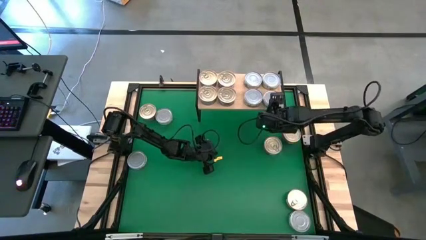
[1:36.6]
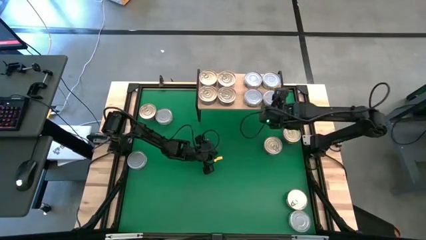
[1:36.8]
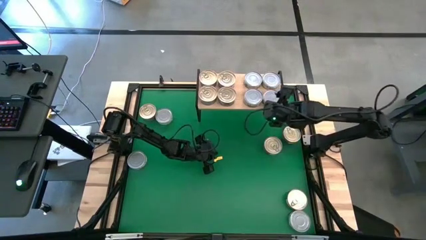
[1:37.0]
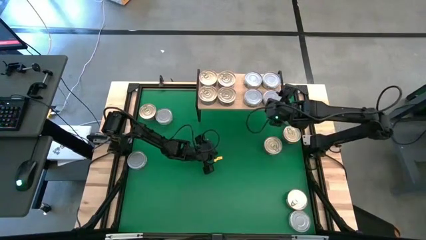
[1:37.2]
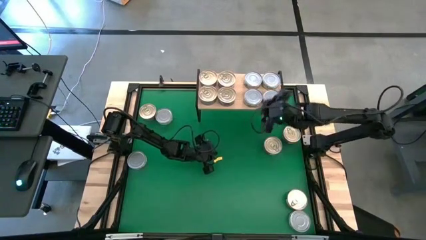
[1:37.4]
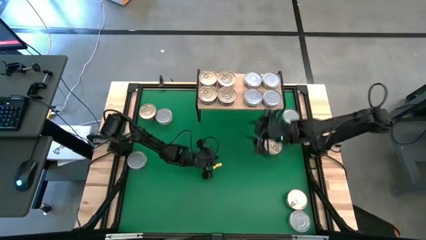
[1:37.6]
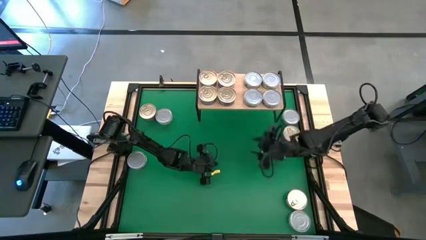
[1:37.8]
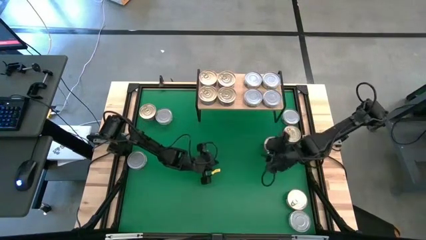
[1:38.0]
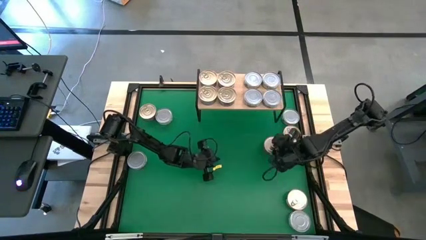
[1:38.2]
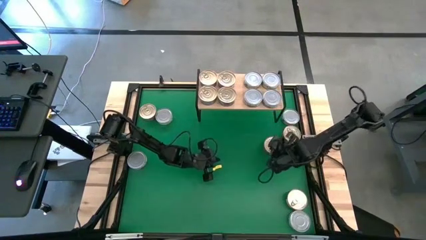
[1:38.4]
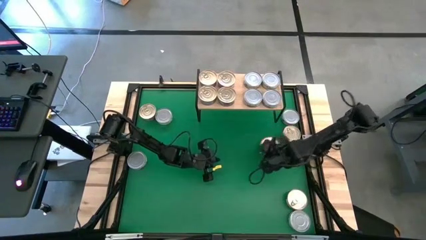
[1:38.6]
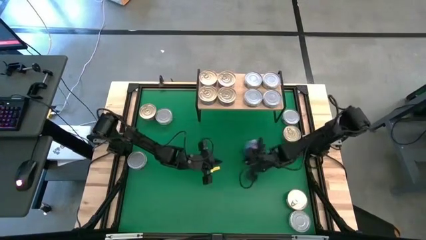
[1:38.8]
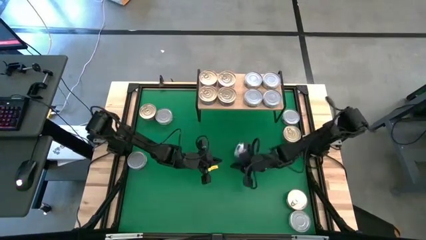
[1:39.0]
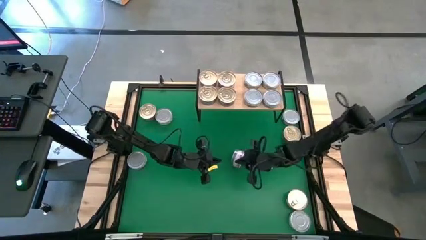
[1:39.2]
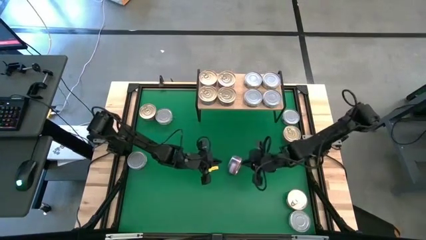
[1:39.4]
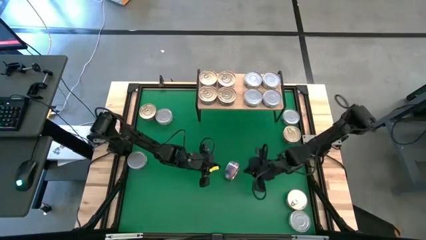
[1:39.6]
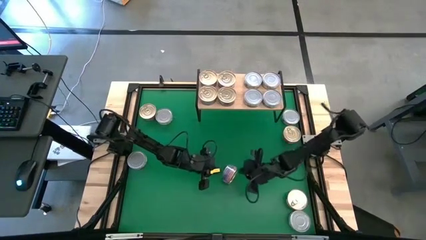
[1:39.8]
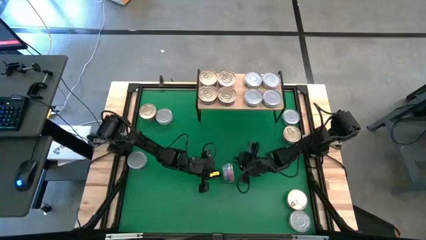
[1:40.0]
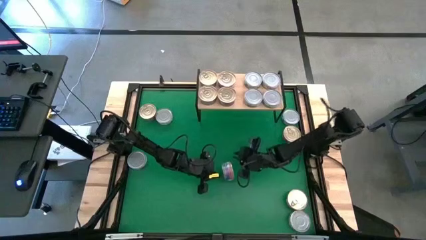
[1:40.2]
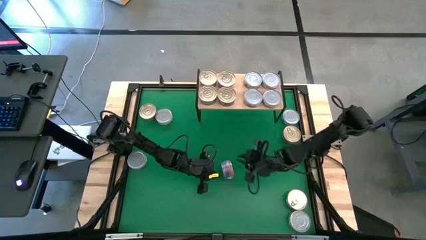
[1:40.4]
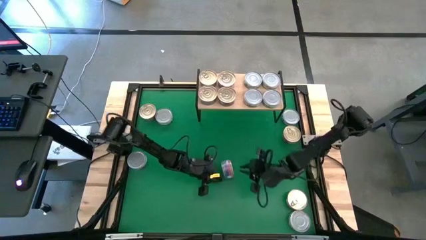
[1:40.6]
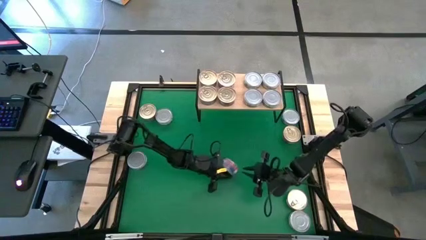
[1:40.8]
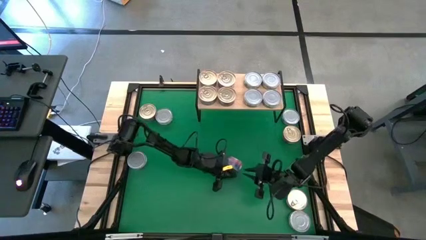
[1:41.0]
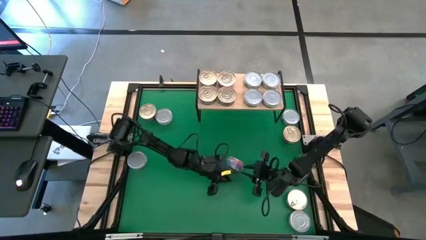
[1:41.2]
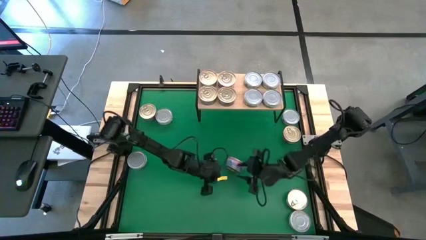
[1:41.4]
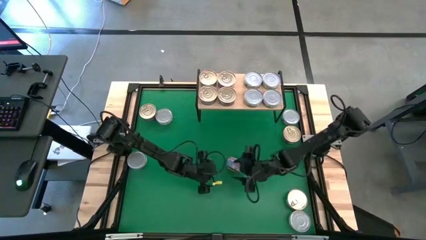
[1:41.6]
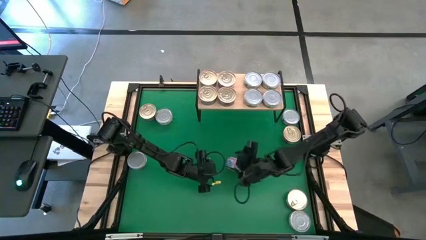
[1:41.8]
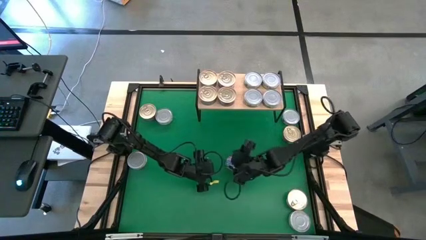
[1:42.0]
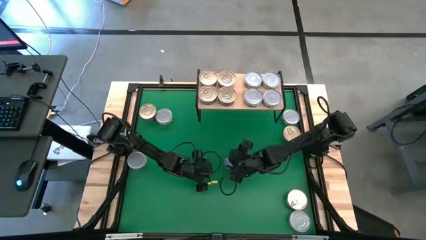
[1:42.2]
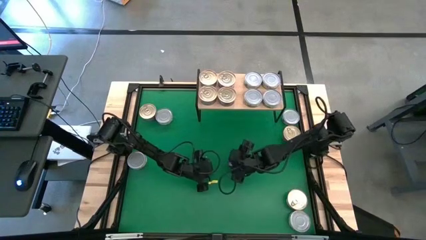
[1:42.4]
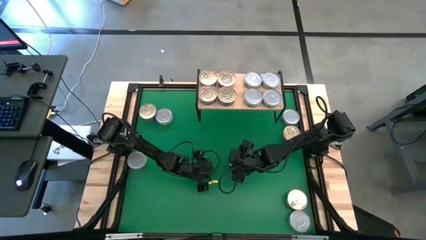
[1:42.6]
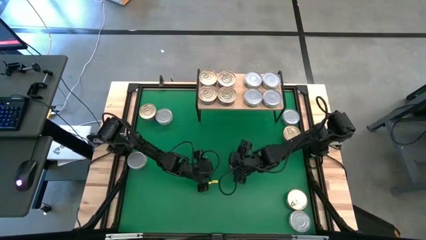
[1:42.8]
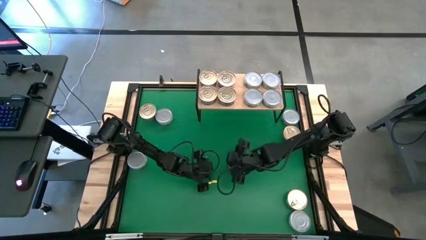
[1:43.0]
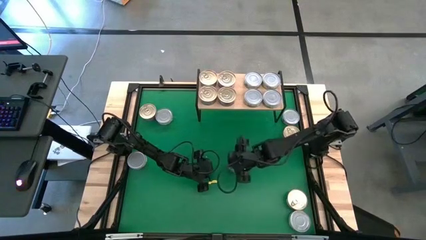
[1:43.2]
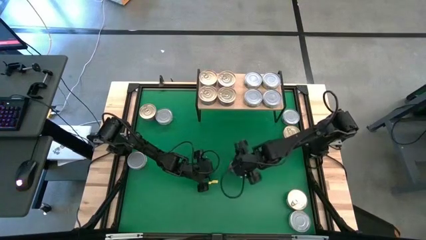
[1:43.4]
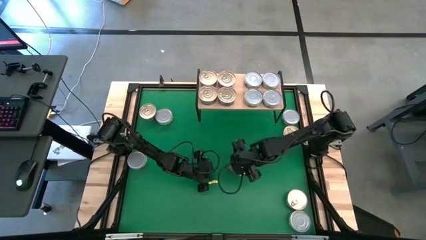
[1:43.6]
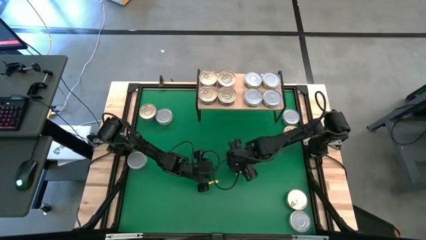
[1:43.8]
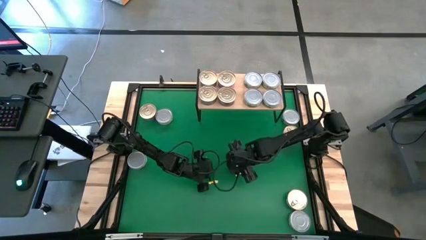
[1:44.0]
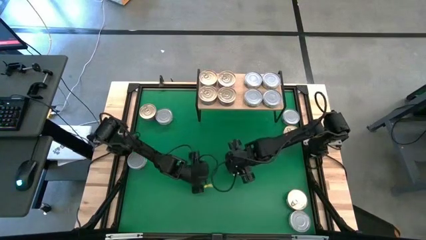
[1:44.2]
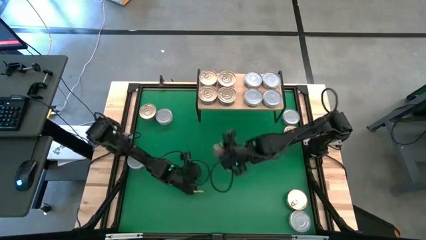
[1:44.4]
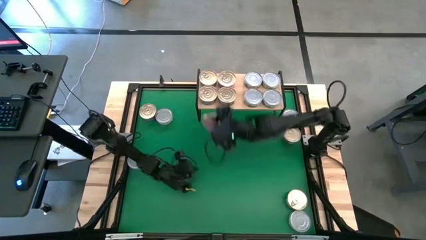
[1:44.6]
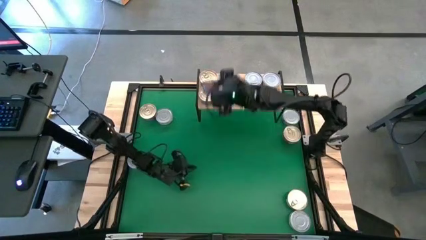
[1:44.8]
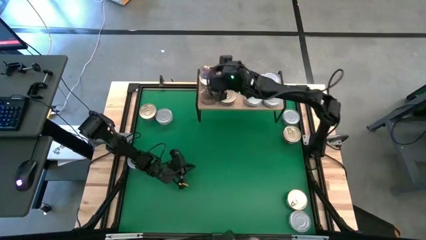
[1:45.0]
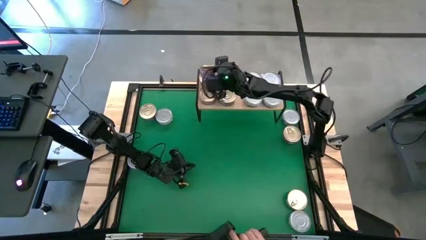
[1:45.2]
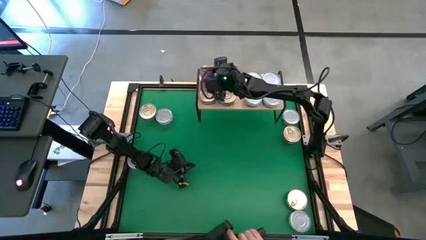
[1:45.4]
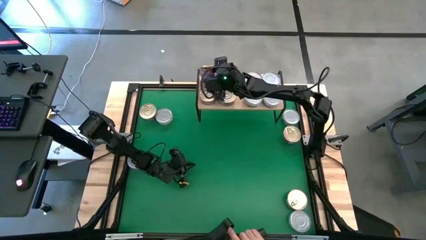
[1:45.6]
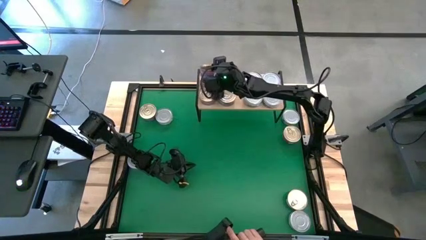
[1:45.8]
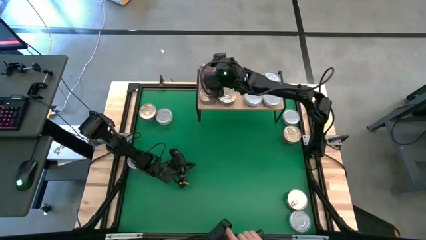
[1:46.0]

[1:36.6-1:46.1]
Task: Stack canned seafood by type on shelf
Stack the blue pink tuna can on top of the blue pink tuna can on the shelf

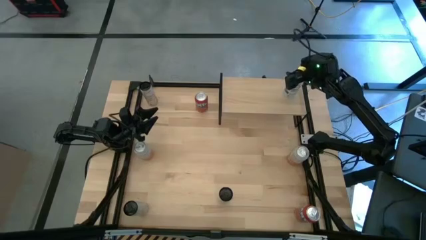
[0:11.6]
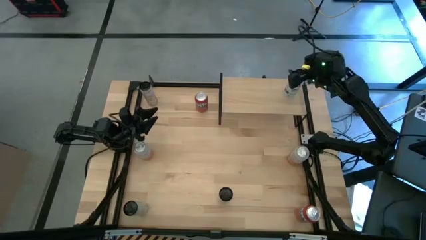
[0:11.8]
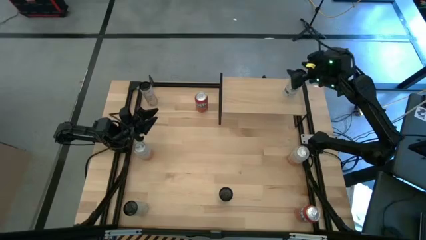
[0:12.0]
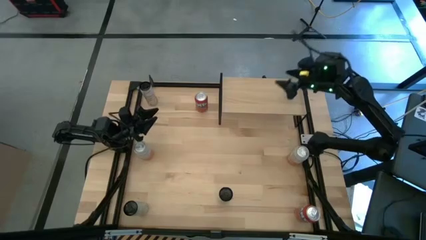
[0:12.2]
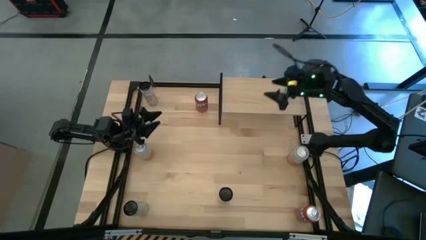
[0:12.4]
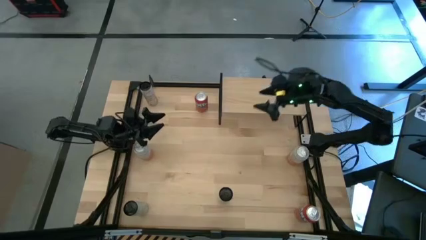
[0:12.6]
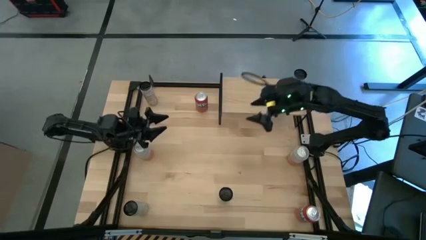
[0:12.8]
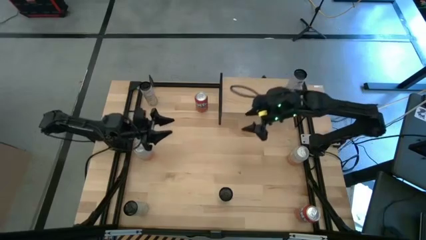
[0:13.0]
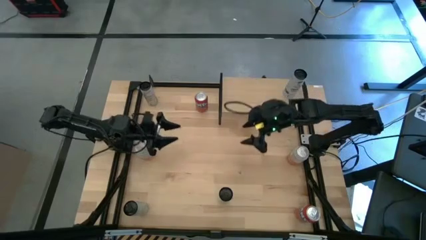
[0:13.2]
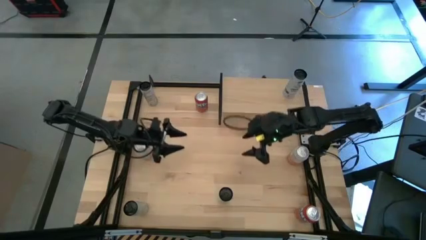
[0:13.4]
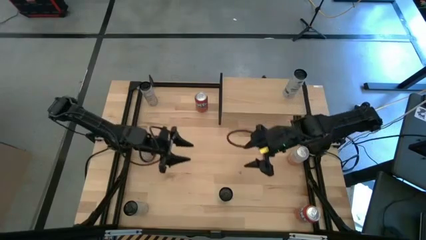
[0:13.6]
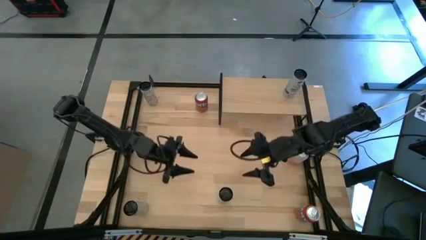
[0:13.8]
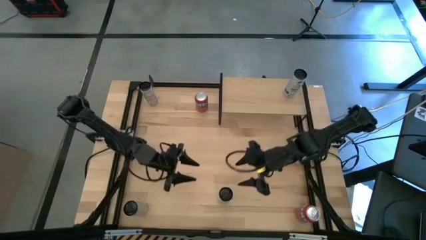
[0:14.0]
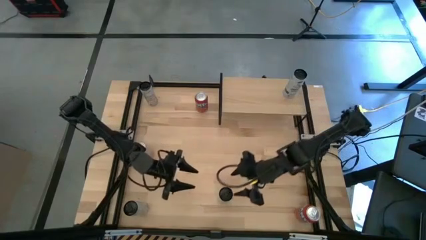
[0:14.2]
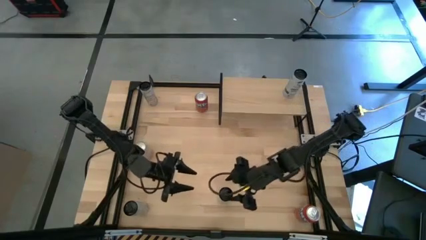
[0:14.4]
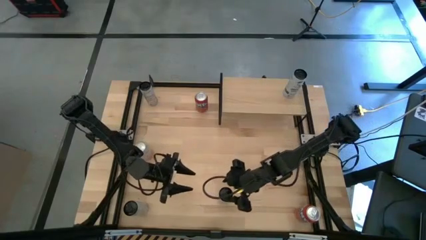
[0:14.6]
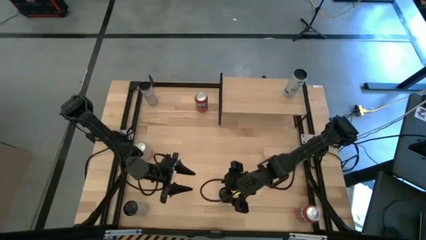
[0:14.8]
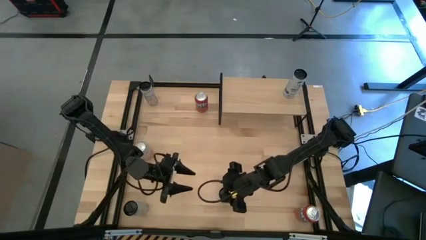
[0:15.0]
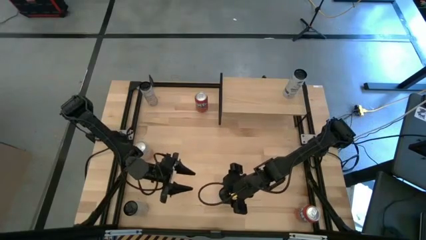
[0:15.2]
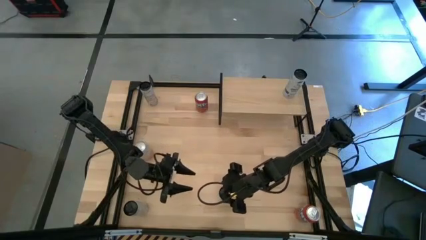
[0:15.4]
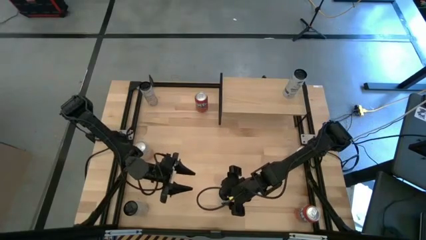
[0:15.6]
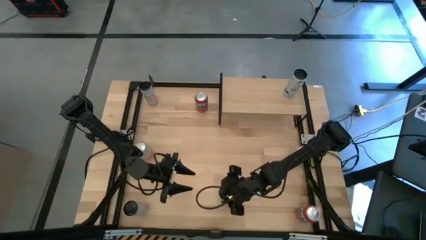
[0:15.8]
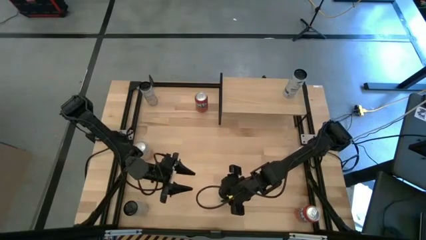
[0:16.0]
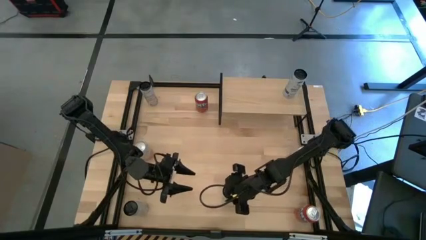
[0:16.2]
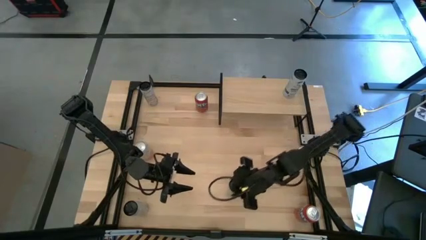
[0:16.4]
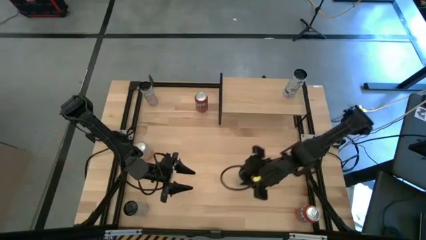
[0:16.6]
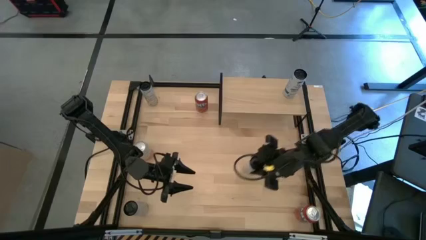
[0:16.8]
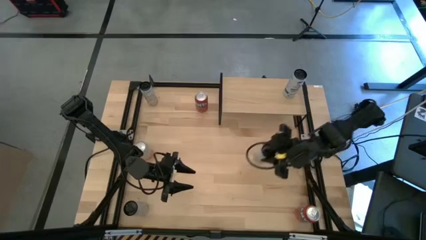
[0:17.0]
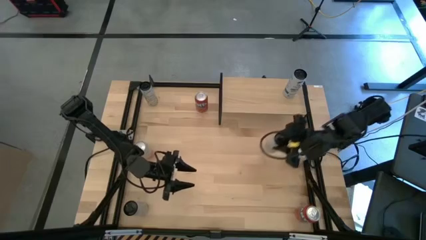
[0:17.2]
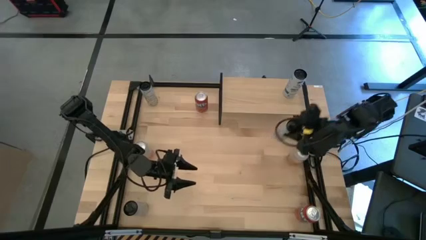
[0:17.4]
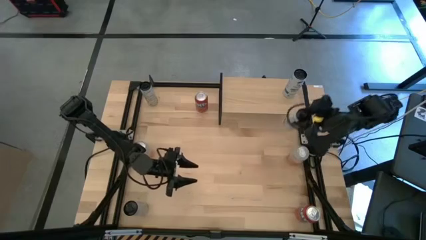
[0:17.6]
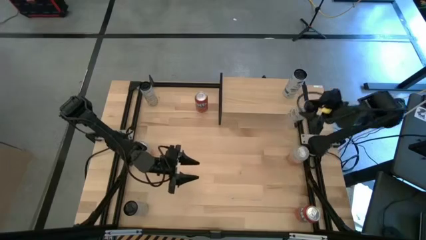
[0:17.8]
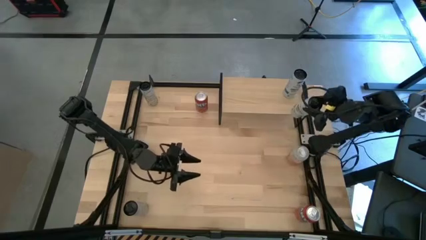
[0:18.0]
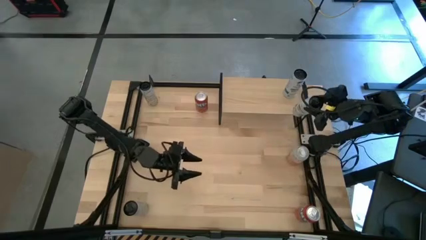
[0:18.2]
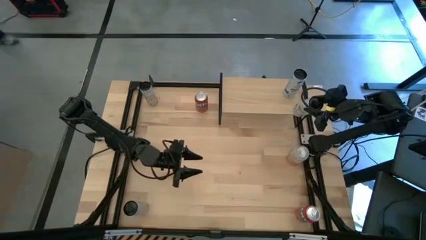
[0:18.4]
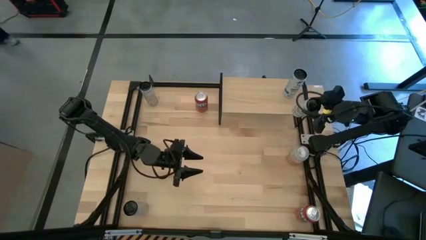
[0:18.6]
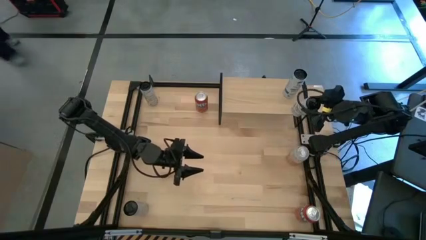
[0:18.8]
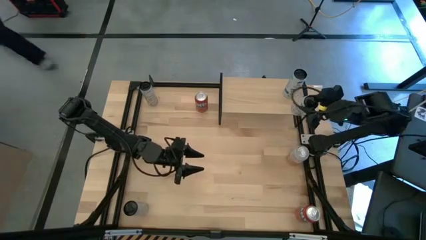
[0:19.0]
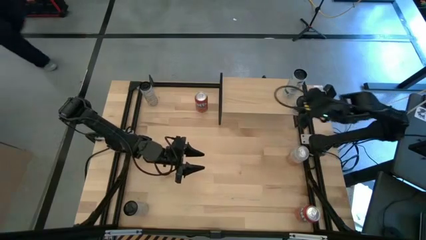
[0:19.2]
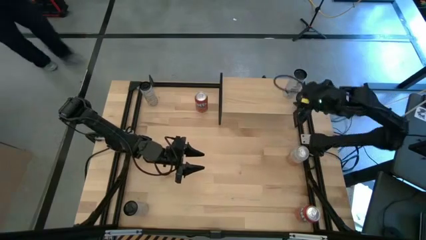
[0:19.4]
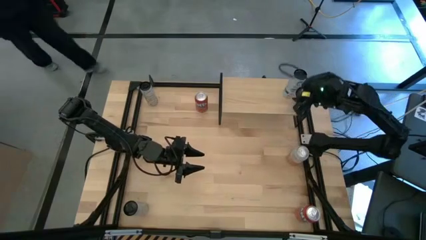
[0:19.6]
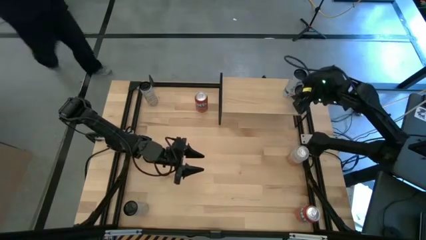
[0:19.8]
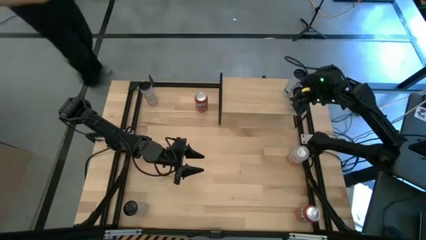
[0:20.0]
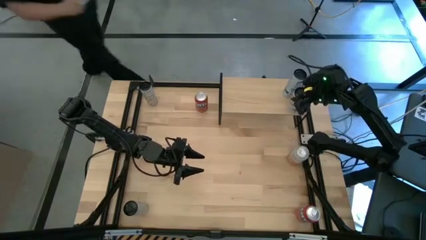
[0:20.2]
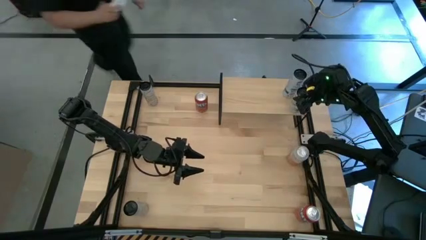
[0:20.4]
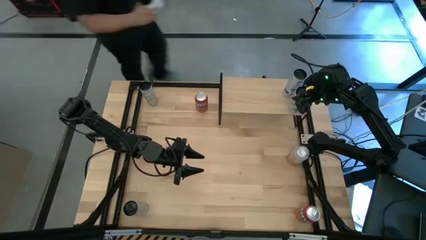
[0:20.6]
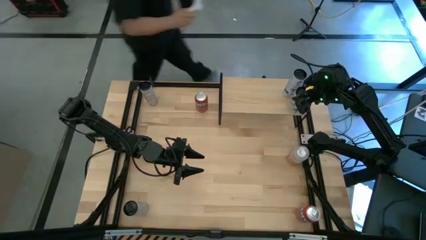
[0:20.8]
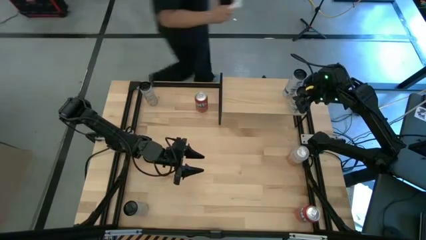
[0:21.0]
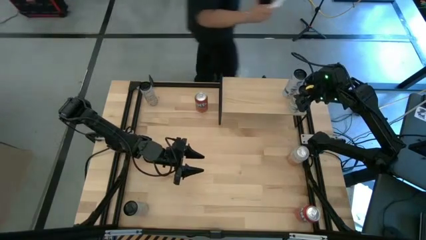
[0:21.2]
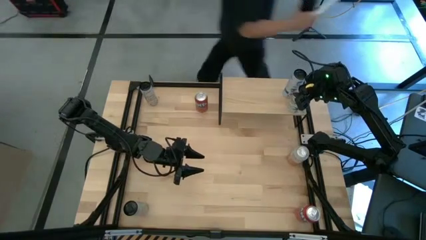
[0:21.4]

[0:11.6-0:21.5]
Task: Place canned beverage on shelf
Put the white blue soda can on the shelf aligned with the other white blue soda can
